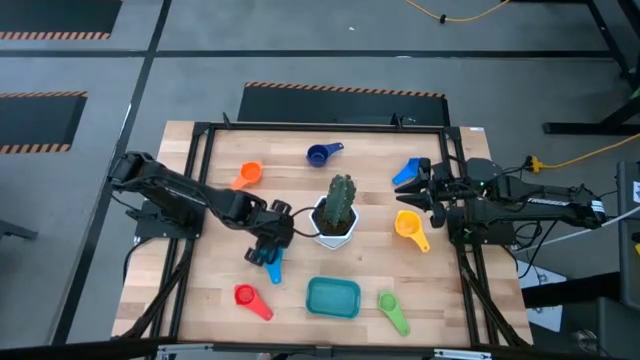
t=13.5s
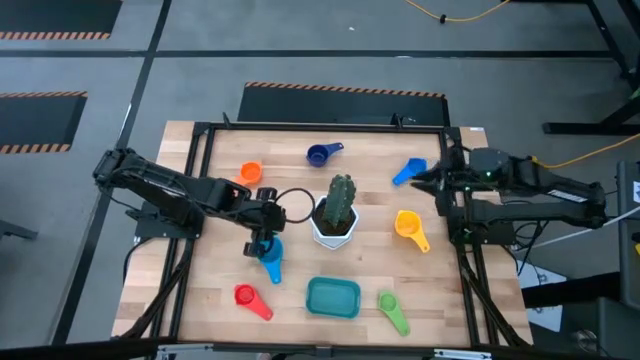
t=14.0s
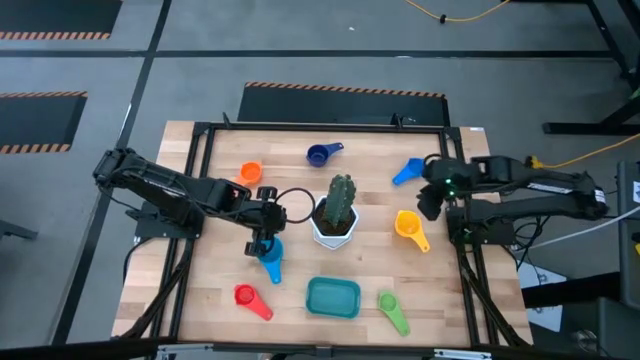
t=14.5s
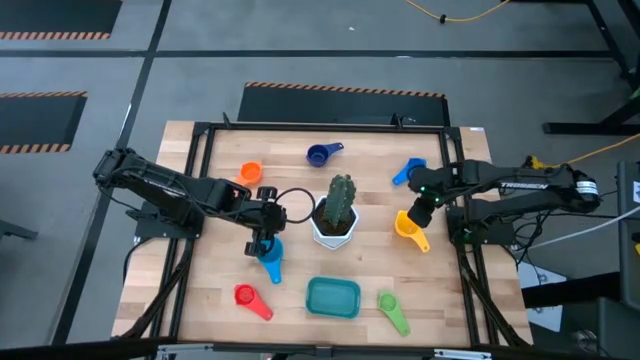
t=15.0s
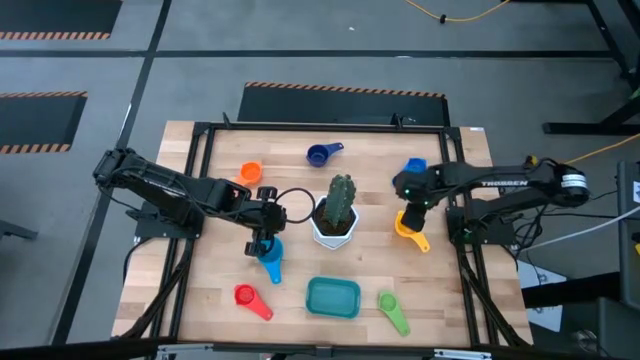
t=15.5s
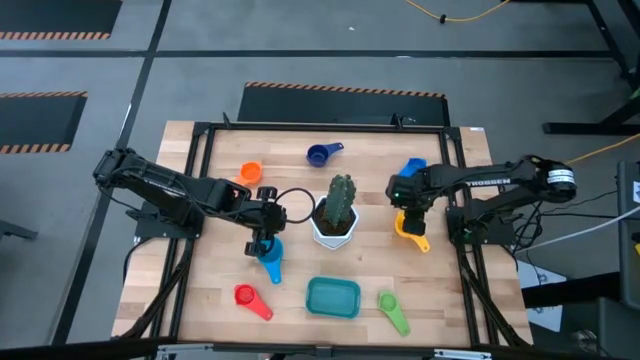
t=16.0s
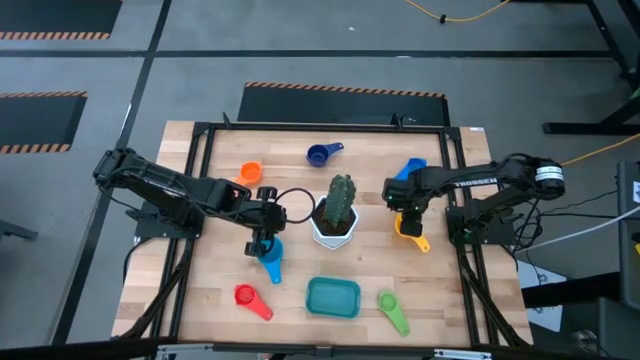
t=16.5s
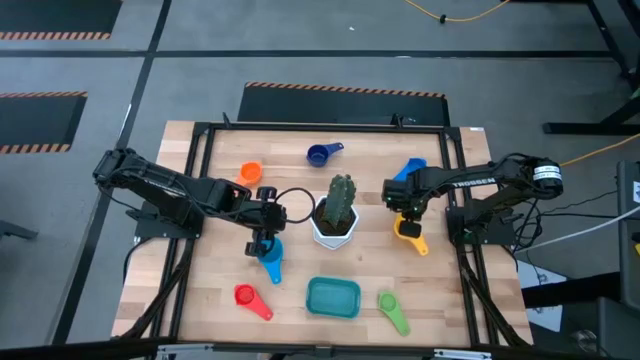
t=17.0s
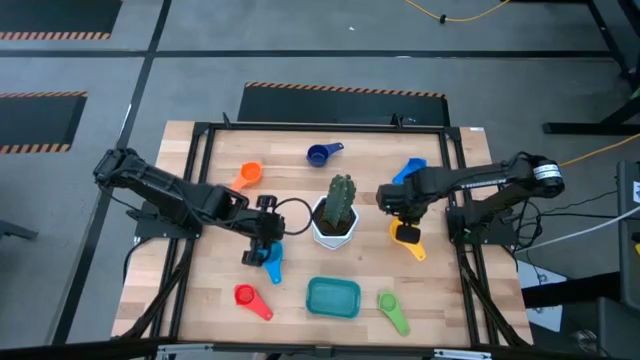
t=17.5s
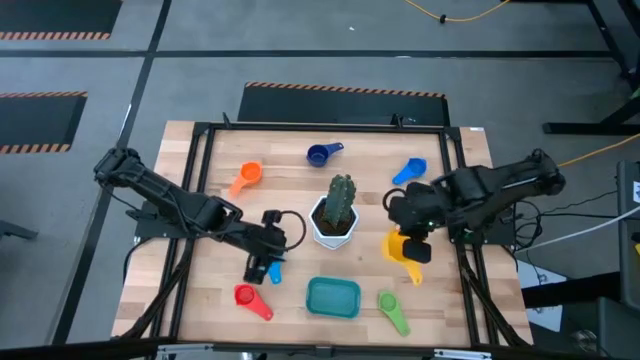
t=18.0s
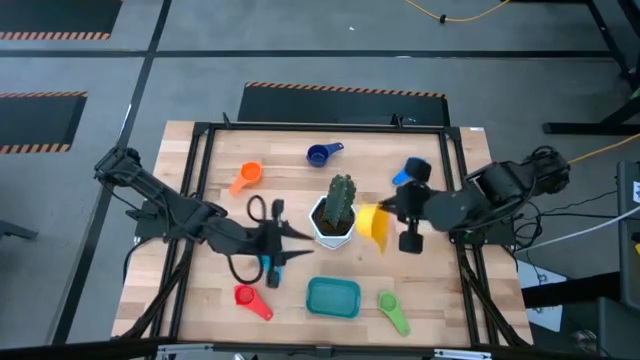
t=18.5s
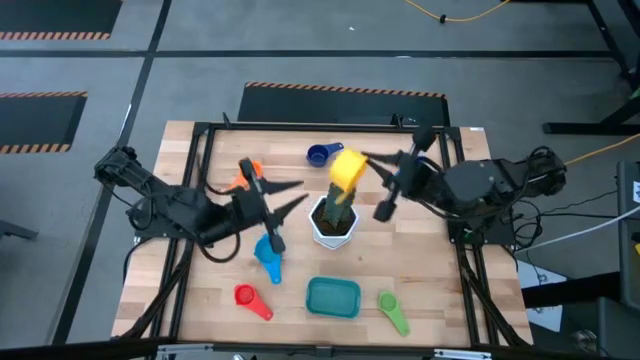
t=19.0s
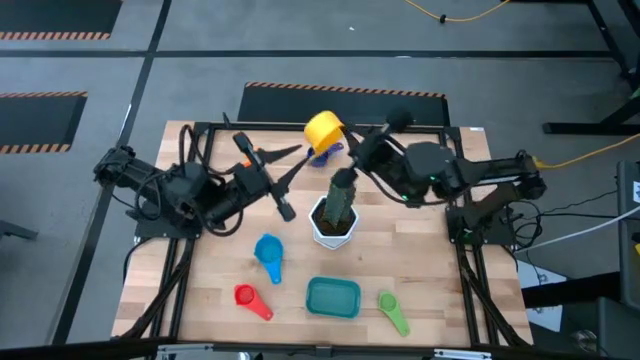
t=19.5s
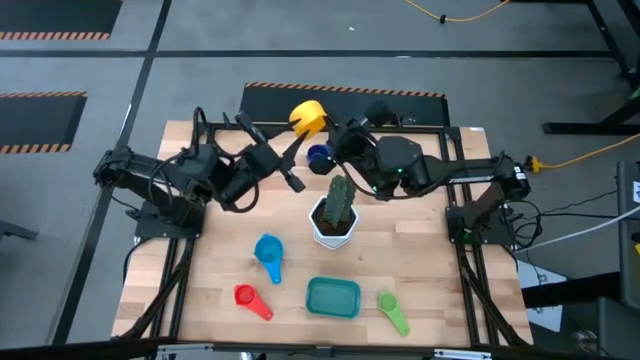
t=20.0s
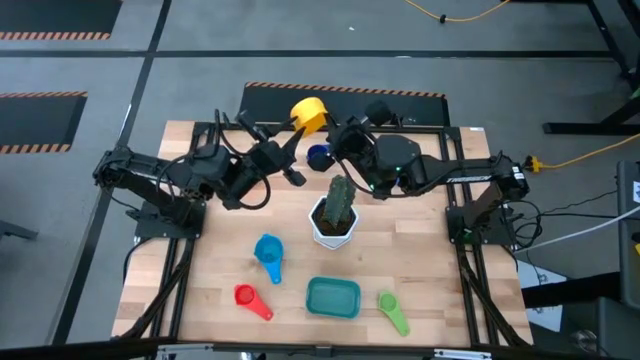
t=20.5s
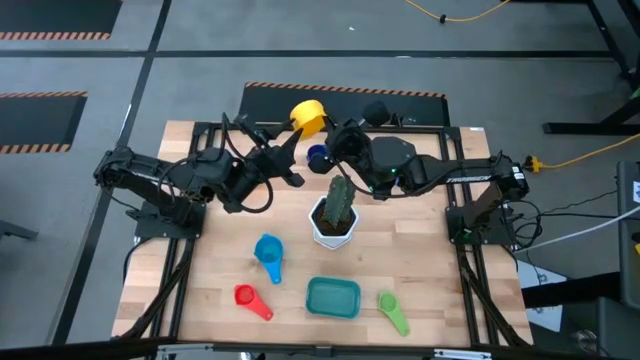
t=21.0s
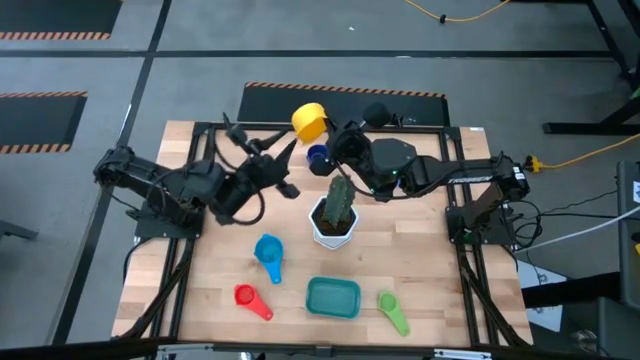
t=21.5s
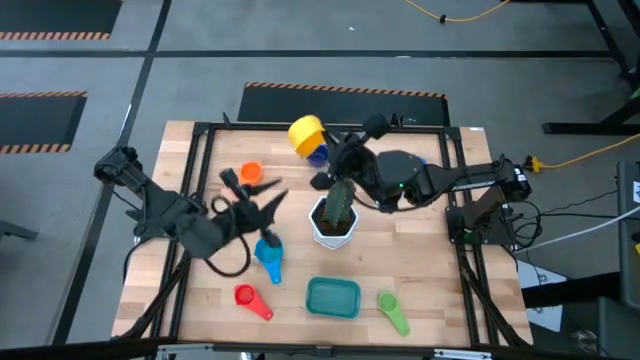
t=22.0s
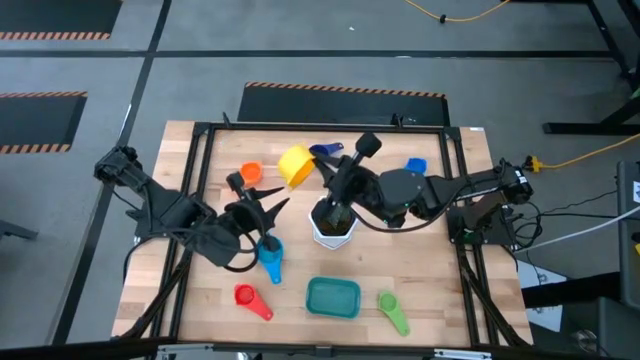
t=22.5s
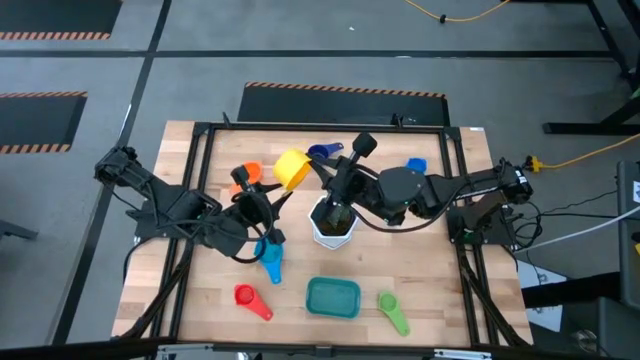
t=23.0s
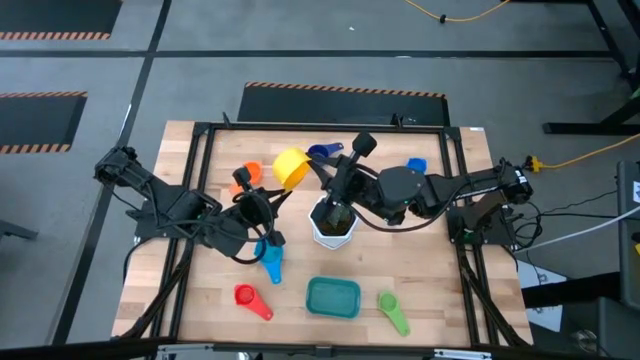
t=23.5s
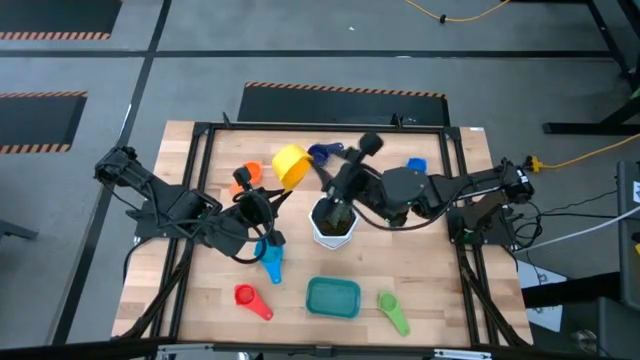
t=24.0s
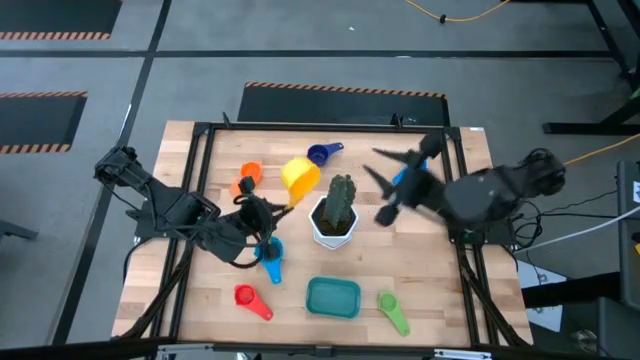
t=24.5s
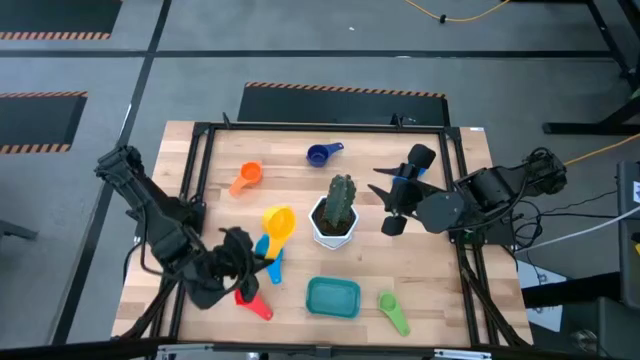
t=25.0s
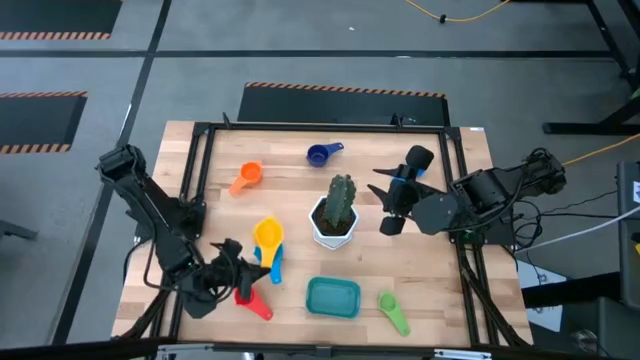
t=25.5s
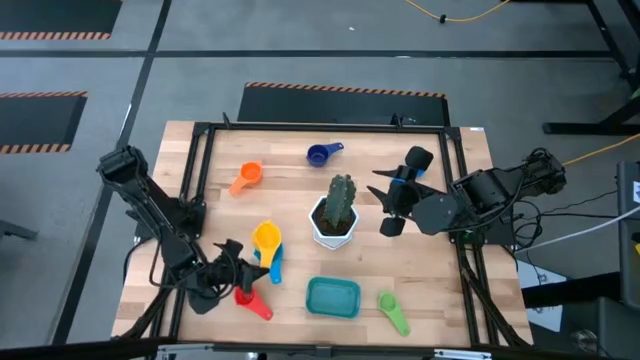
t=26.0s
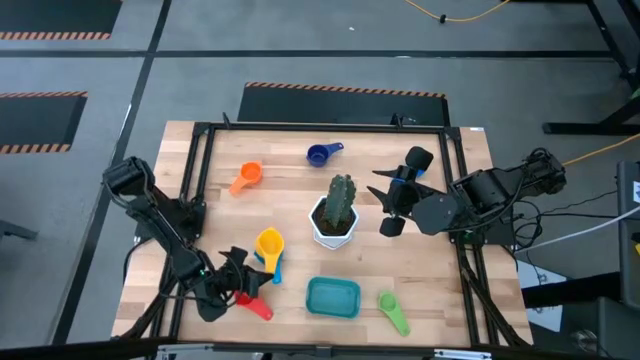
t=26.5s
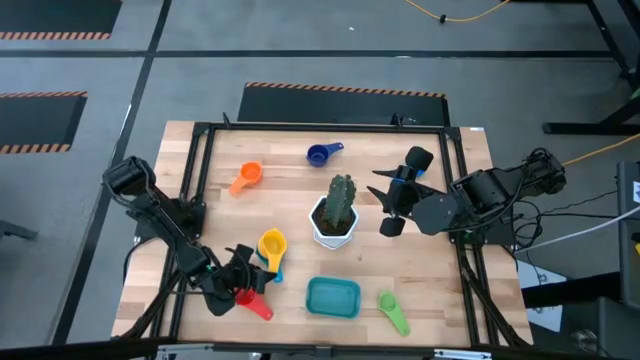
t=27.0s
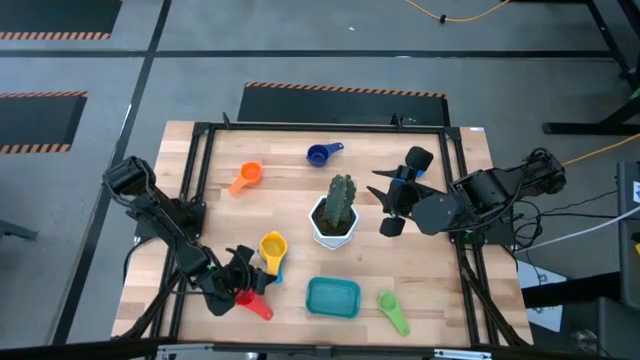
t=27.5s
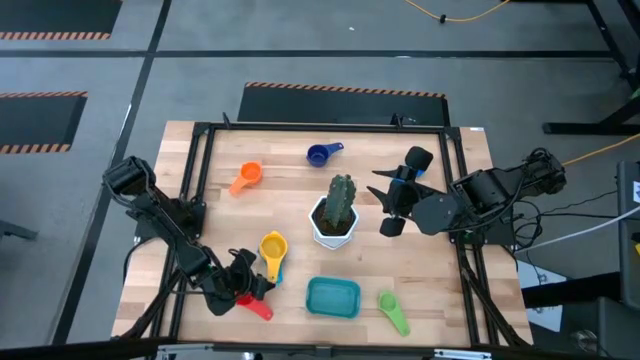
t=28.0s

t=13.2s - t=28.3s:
Task: Nest measuring cups in basket
Stack the yellow measuring cup on top of the light blue measuring cup

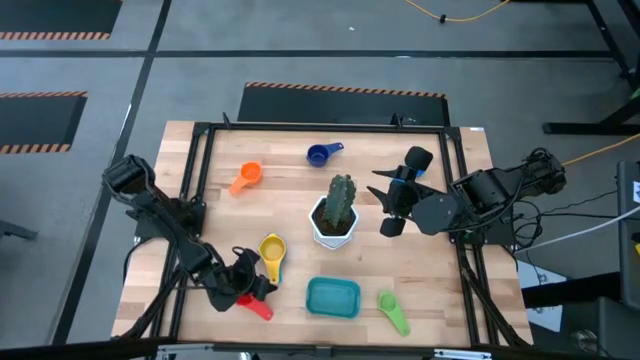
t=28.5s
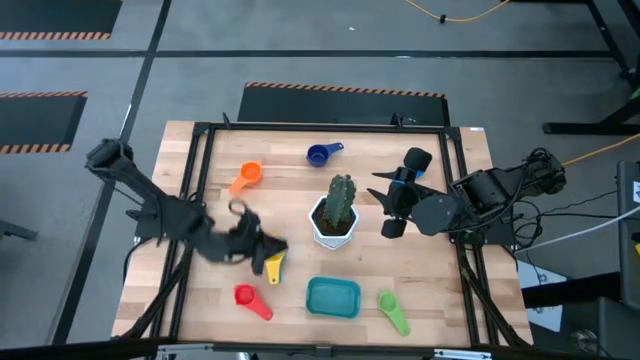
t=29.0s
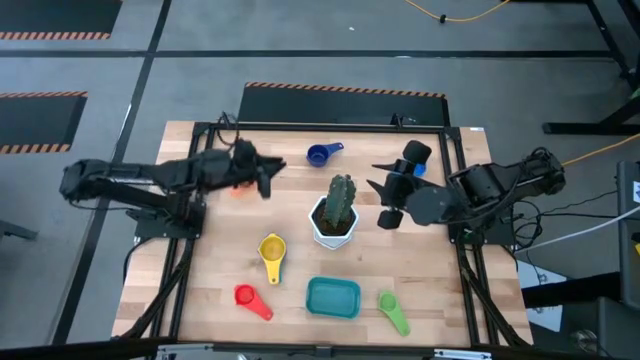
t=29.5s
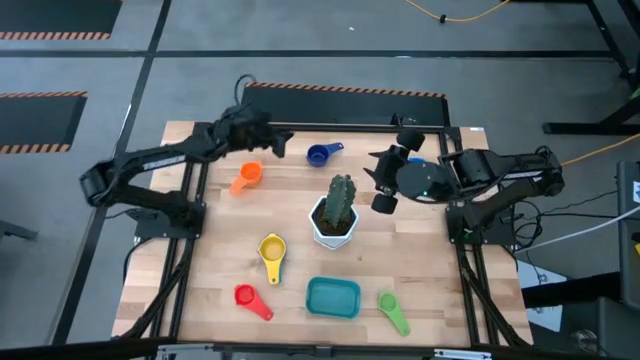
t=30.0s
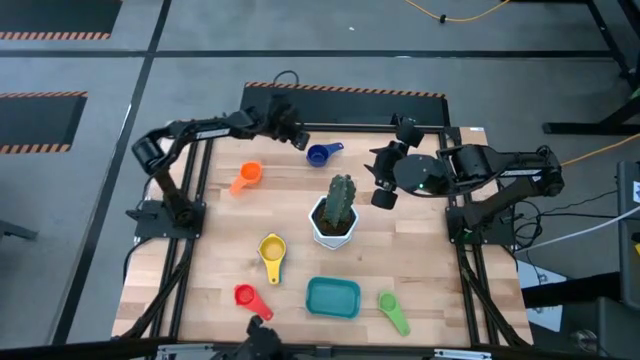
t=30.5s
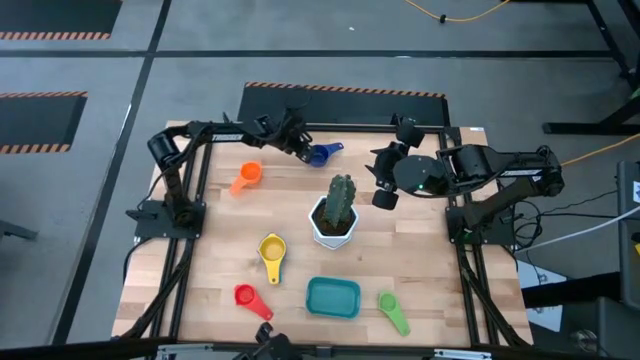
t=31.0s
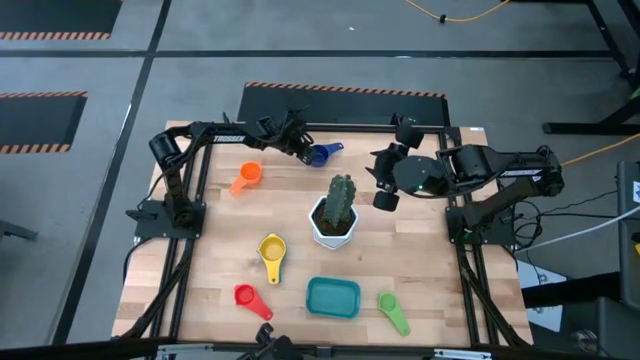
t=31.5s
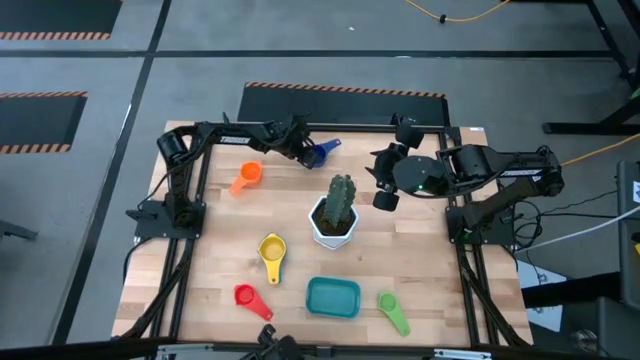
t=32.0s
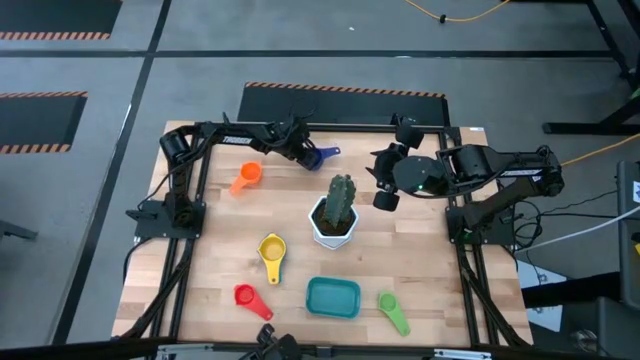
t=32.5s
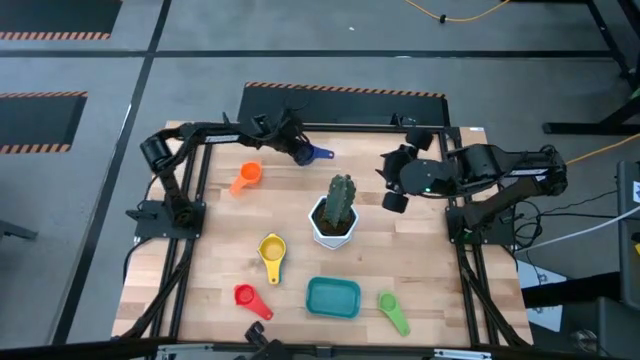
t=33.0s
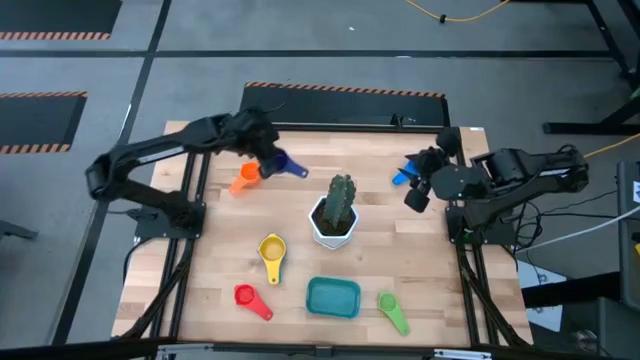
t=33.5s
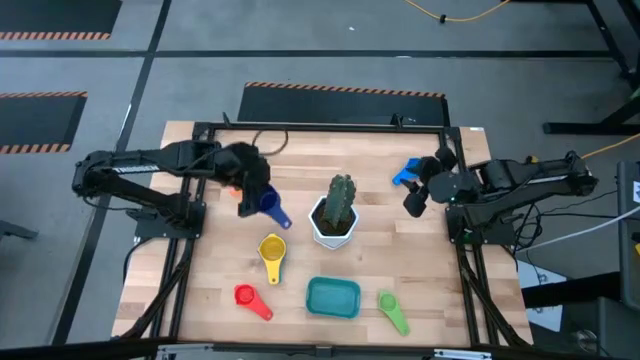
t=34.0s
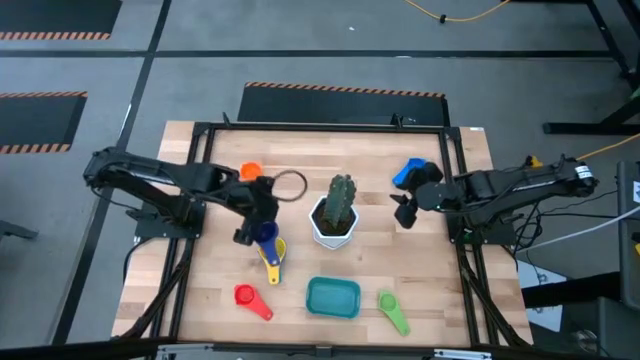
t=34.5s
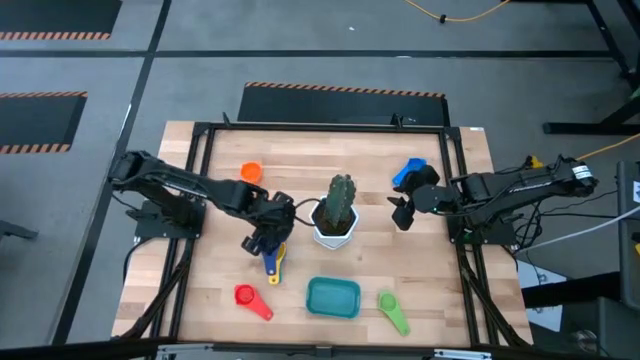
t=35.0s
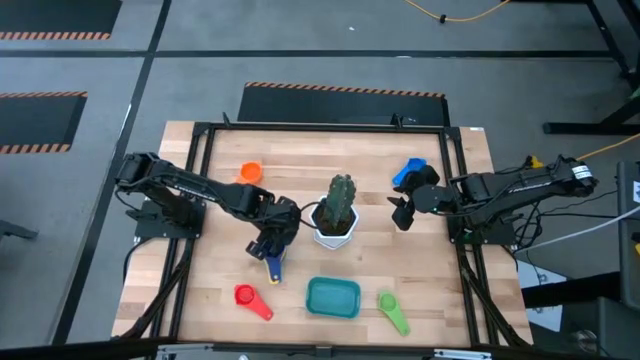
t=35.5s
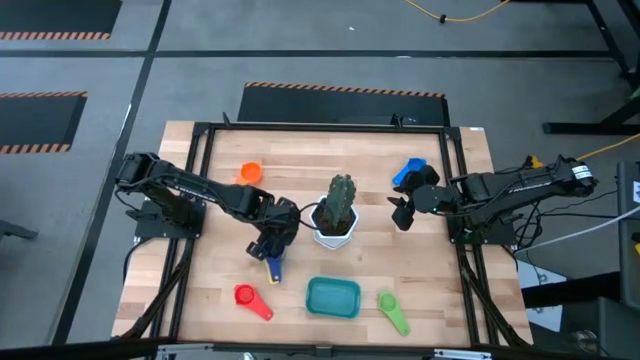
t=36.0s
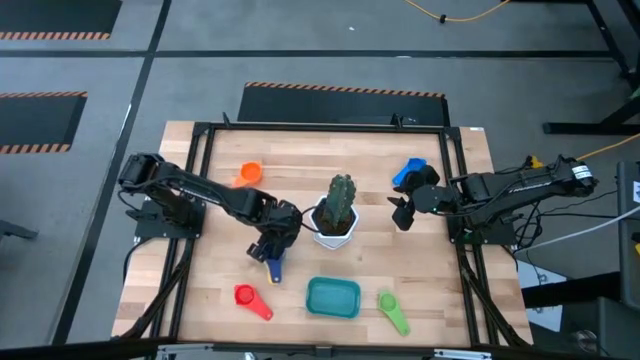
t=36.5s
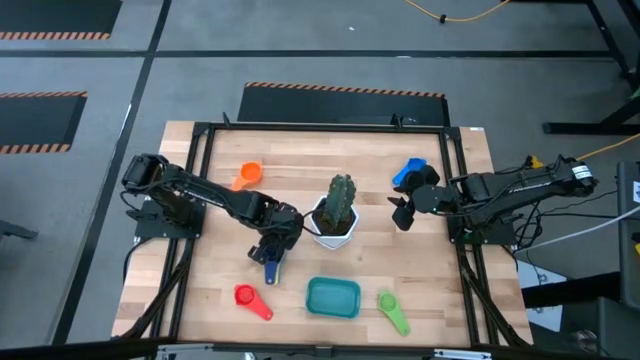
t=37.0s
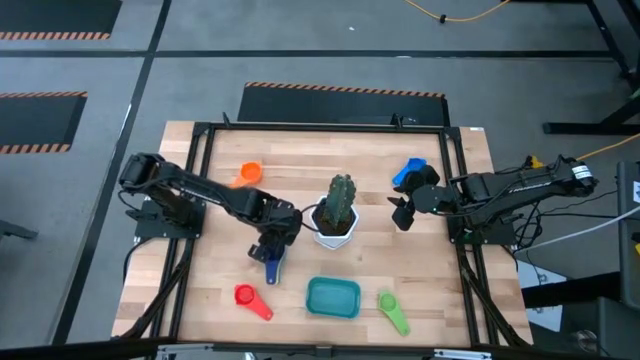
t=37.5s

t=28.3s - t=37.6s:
Stack the dark blue measuring cup on top of the yellow measuring cup
